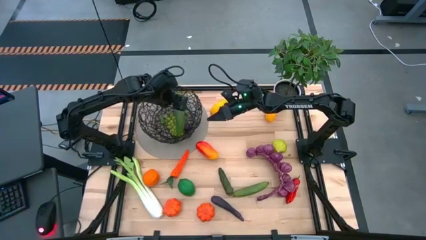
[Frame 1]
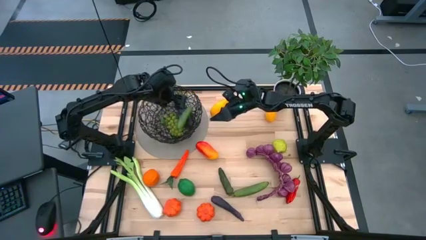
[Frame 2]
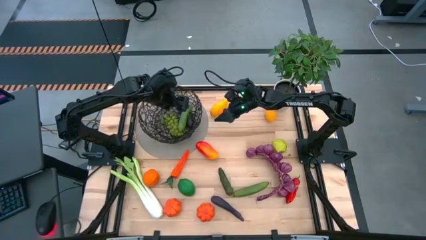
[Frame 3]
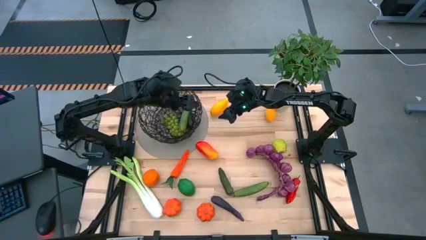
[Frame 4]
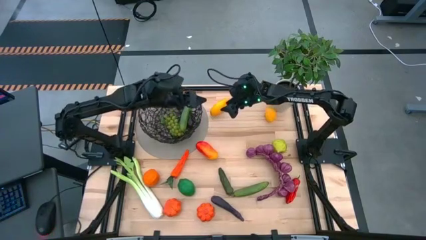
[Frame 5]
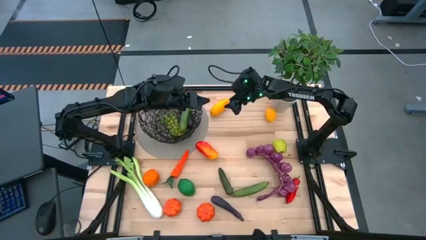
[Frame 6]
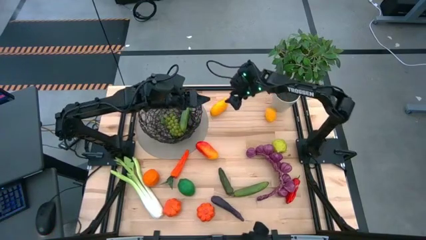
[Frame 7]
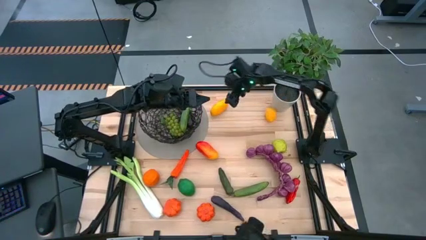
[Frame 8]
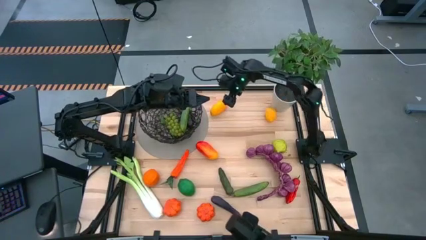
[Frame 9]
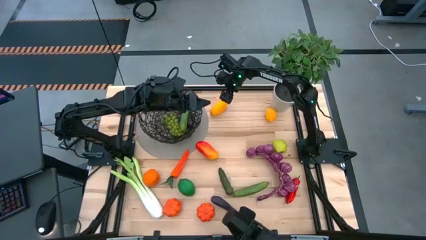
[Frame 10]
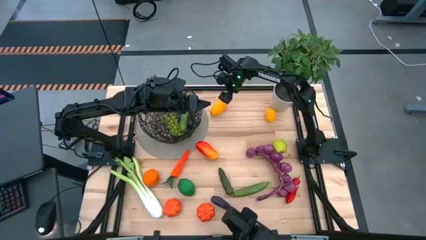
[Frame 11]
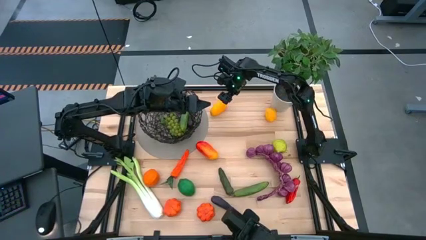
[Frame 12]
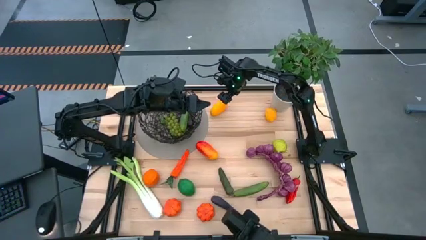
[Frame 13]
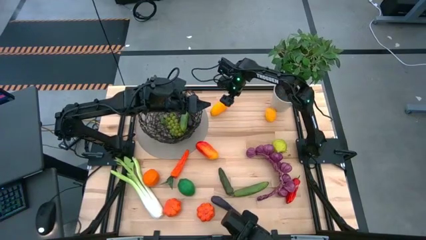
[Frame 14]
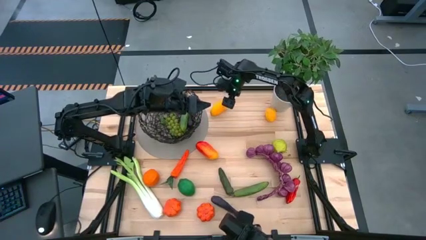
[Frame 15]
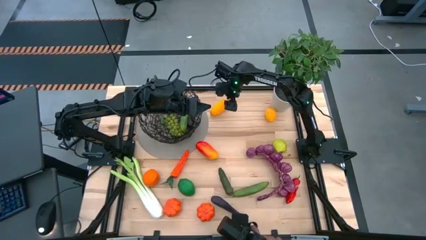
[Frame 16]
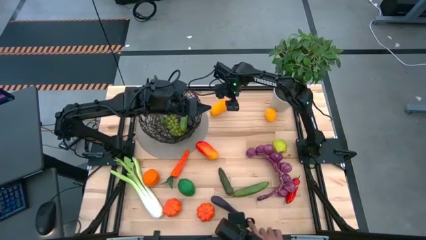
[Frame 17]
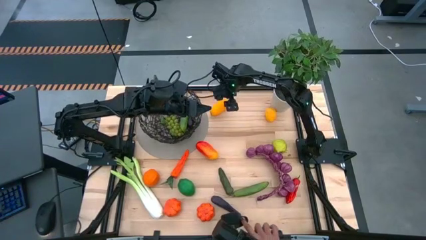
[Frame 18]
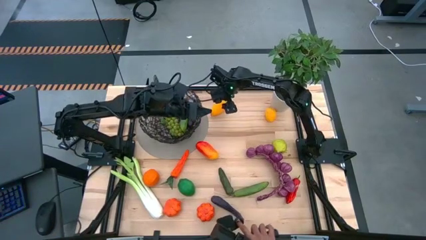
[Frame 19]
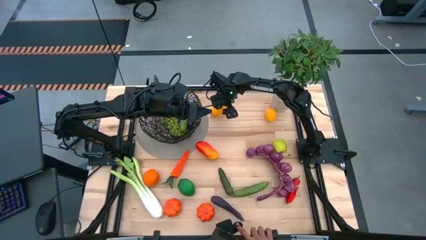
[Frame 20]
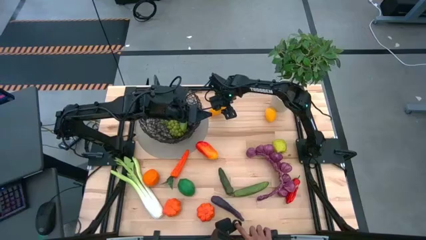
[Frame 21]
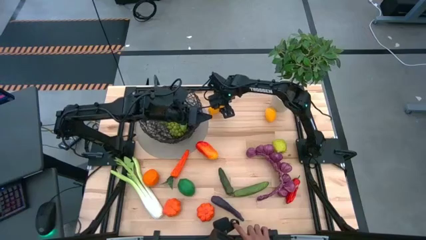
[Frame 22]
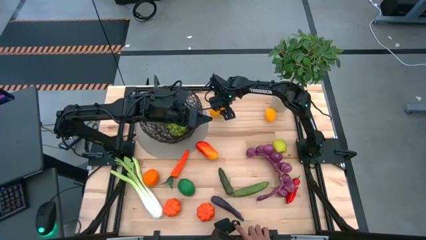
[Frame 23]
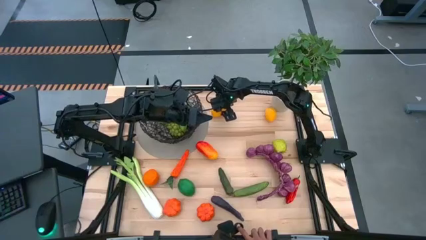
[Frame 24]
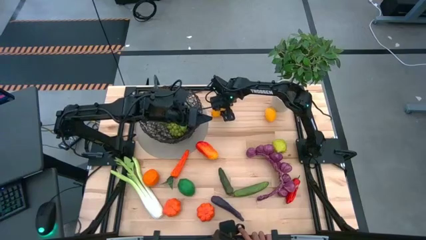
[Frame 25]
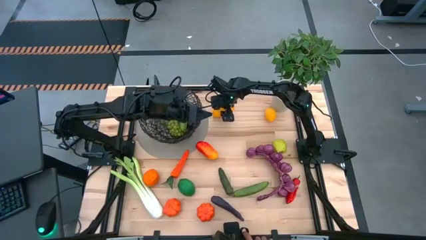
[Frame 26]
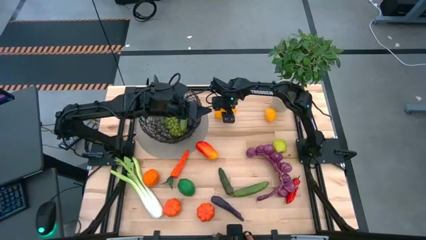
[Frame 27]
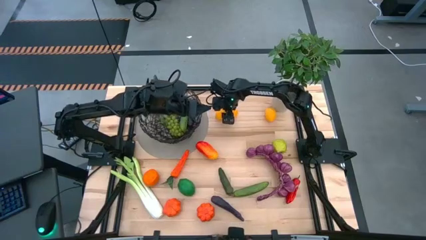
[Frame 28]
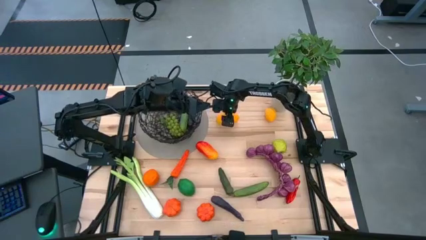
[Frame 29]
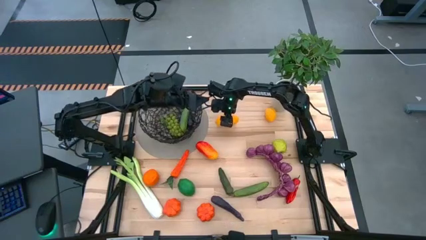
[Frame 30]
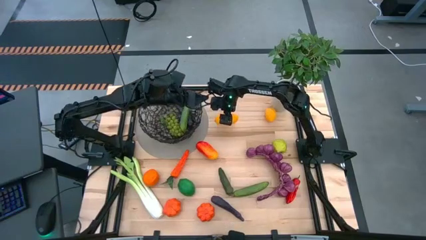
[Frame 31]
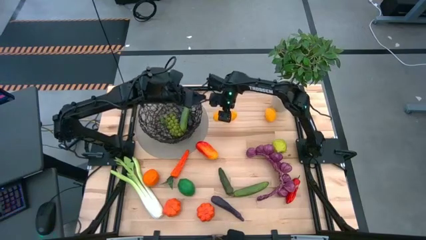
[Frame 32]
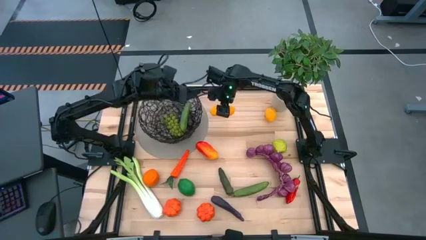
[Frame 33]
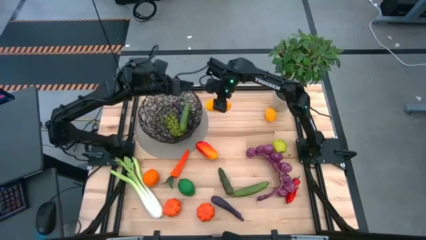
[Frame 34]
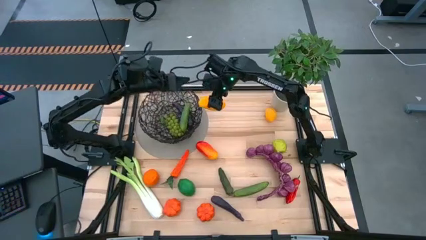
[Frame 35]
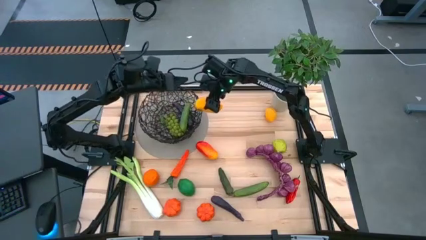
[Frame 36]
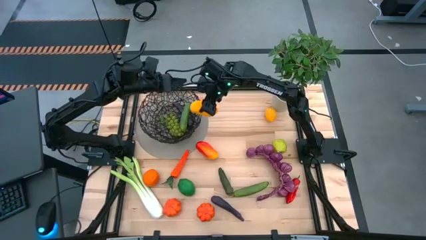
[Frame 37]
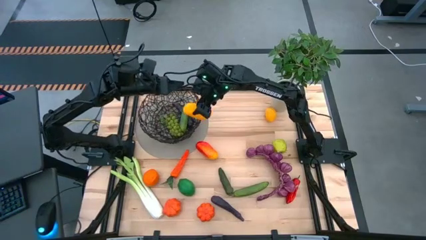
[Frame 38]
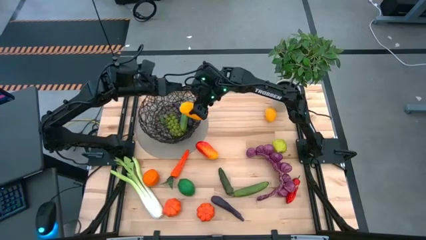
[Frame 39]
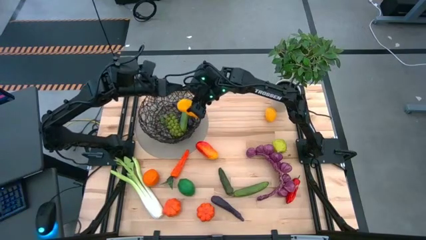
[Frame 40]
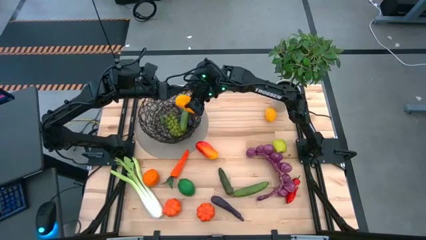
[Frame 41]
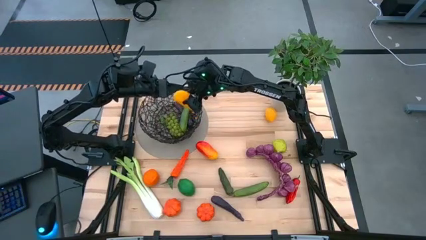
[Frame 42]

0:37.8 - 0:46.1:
Task: Build produce basket
Put the yellow mango into the black wire basket

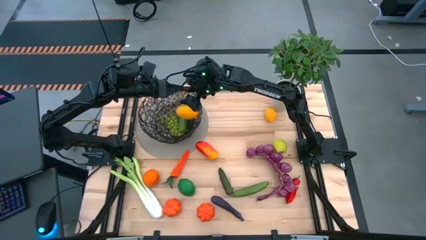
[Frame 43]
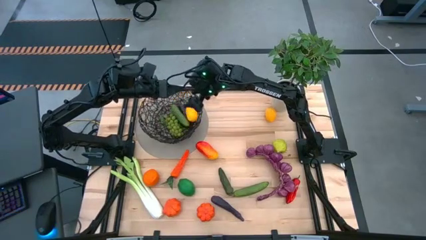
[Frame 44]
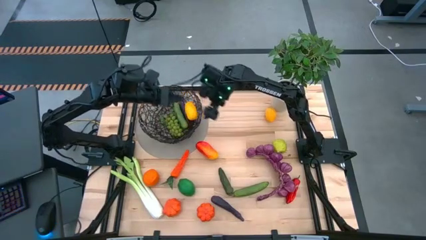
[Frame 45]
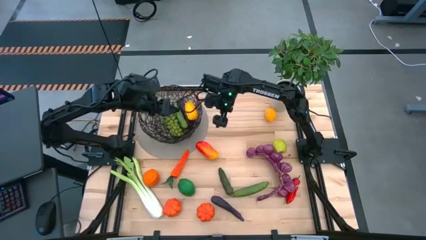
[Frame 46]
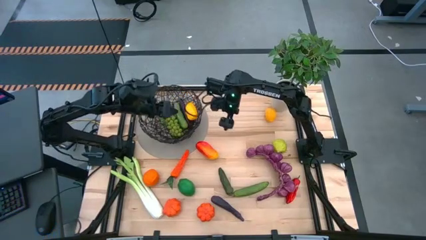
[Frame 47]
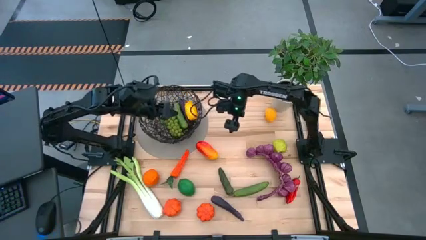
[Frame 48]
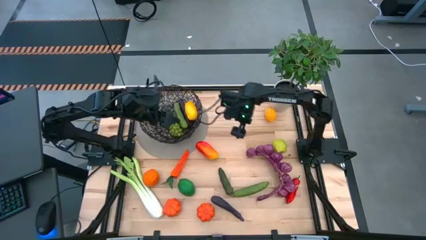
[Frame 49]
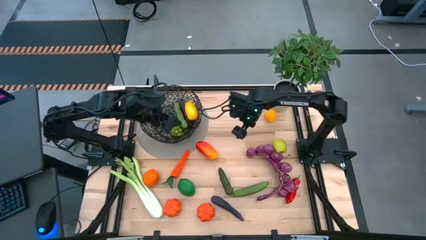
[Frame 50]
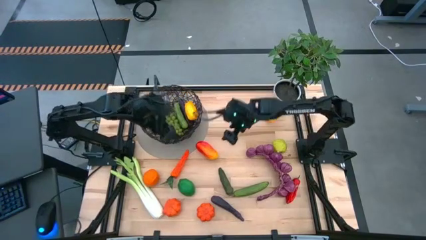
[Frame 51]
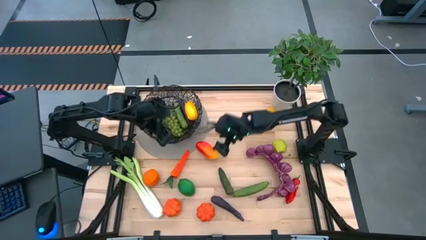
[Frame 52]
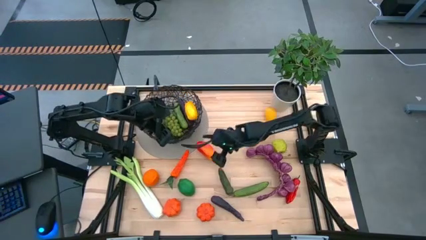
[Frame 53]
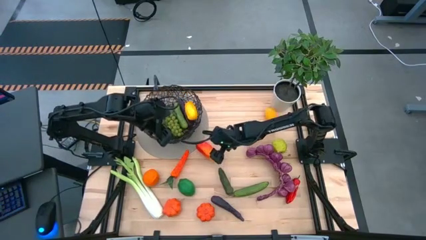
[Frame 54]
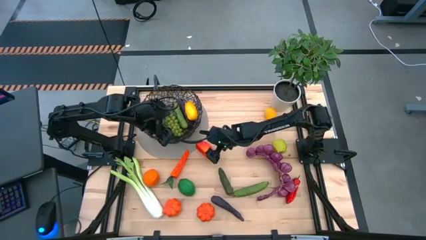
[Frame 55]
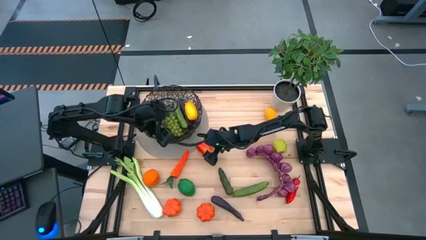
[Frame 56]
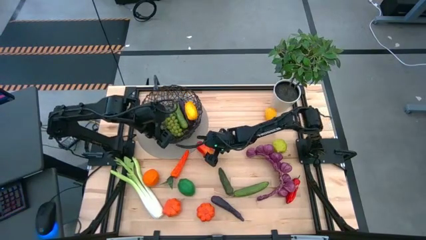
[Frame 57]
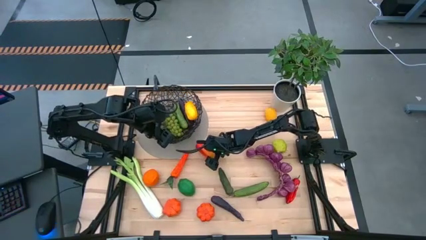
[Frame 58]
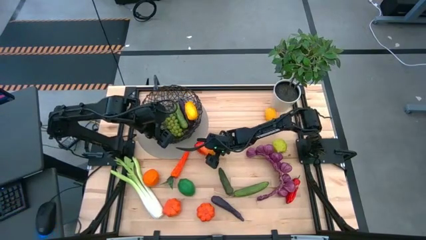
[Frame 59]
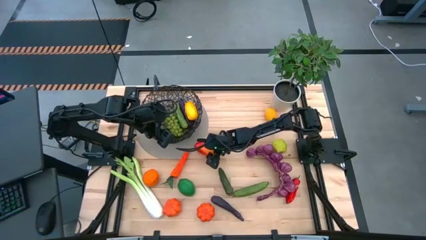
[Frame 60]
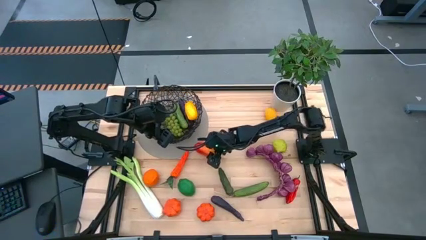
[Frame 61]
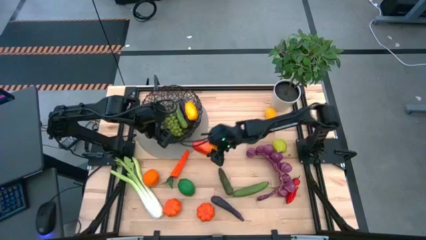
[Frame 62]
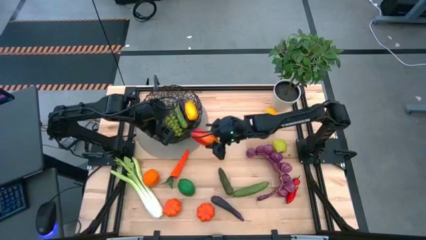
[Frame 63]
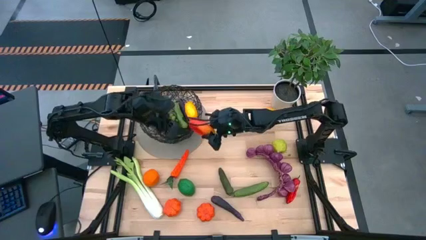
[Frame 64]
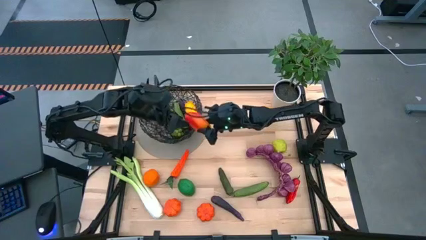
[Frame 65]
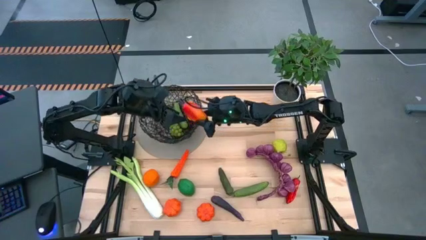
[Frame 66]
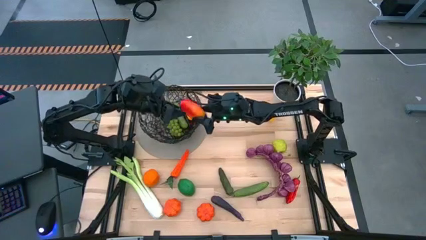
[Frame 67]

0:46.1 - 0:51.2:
Put the orange mango into the black wire basket

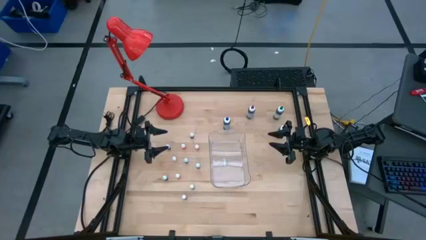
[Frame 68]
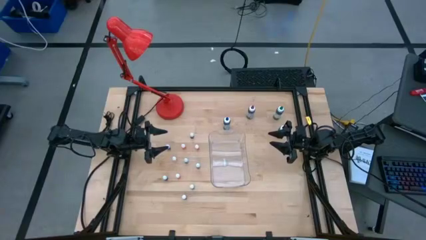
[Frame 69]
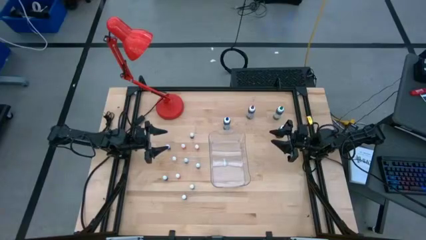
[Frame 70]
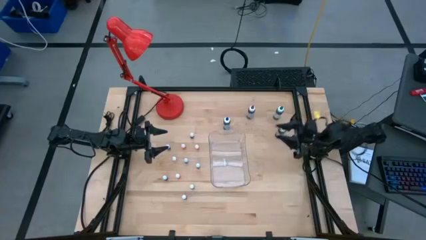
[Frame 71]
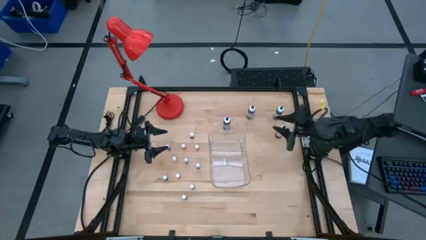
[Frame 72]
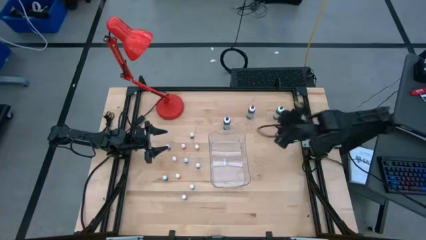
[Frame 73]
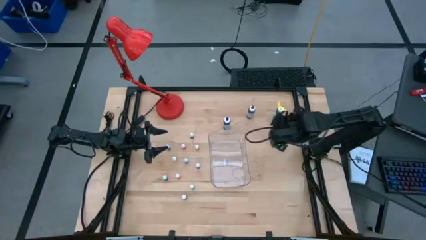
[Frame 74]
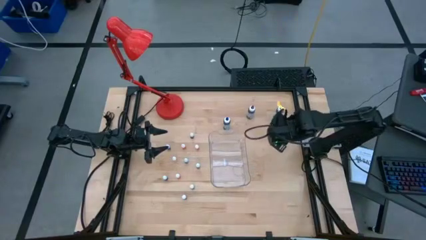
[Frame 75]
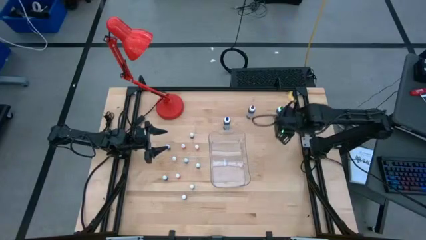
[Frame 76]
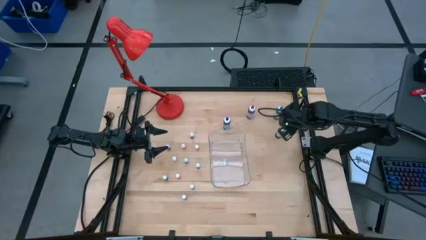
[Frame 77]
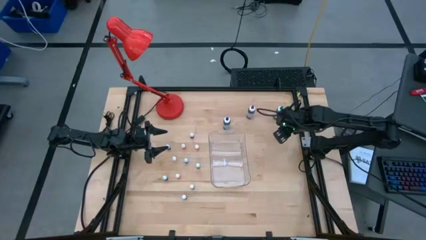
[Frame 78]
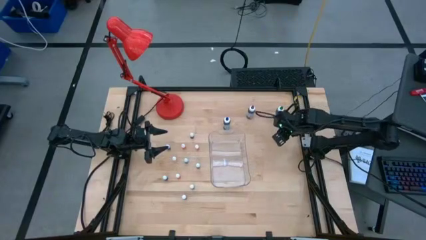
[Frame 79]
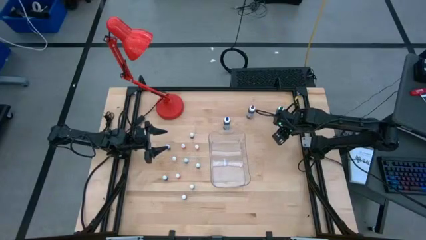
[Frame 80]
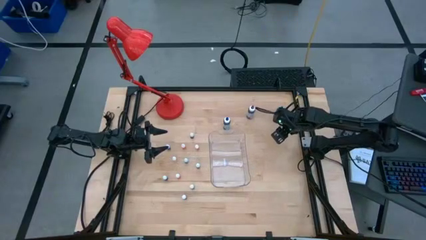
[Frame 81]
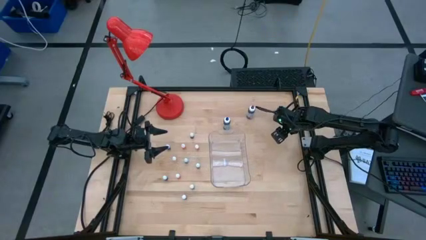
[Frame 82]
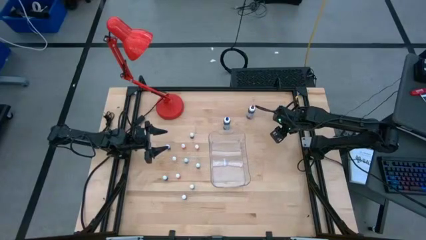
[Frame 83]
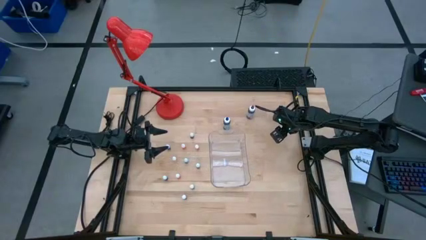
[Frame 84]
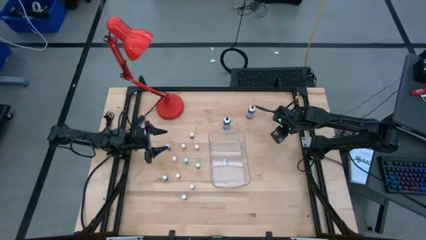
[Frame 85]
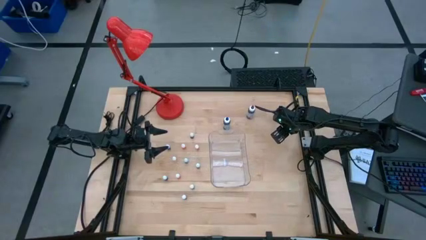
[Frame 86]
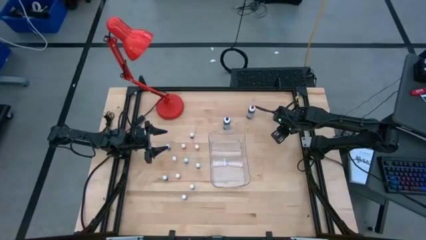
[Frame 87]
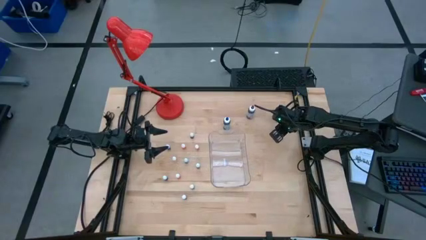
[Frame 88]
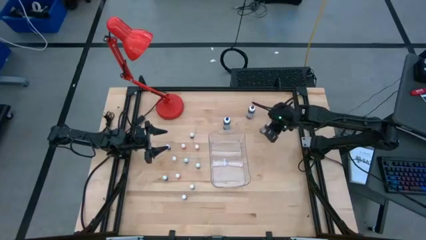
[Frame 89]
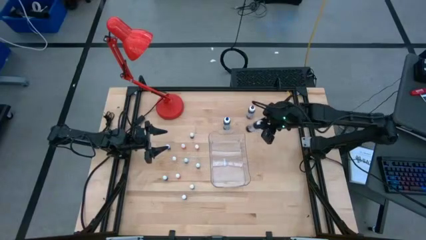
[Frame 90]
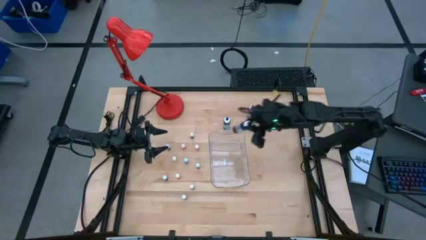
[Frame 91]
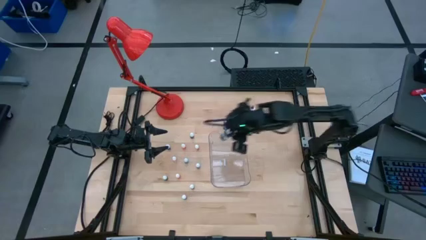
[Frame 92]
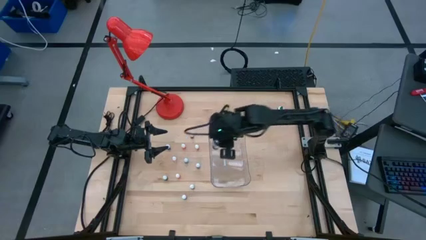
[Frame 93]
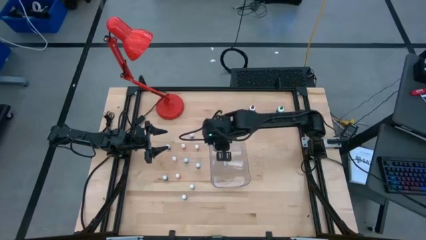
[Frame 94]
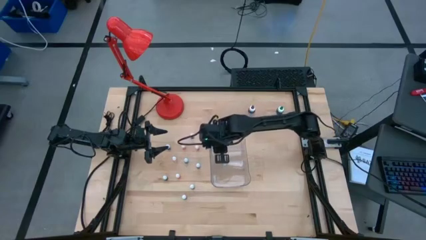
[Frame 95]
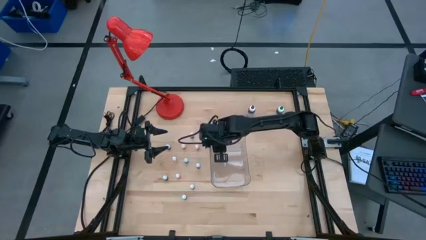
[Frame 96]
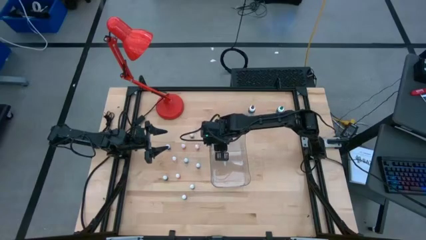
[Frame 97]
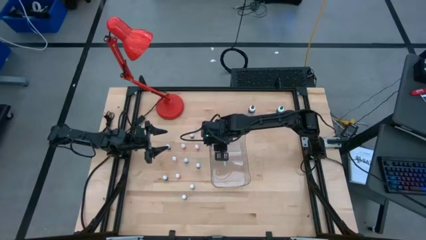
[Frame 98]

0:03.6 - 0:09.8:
Task: Pick & Place food coloring
Put the black food coloring bottle into the transparent container
